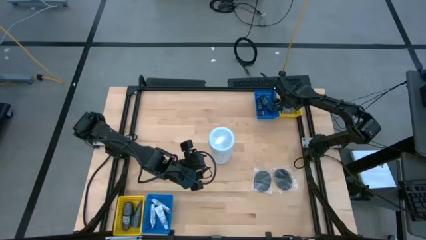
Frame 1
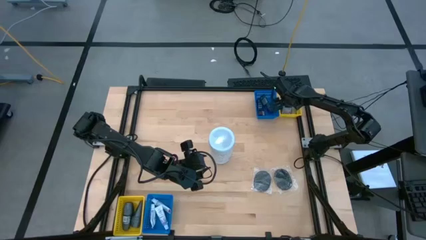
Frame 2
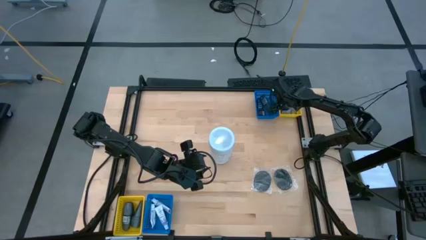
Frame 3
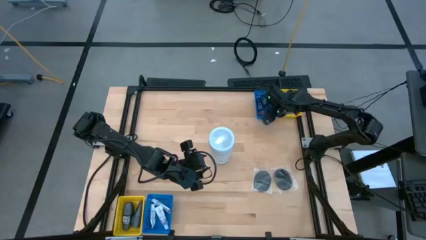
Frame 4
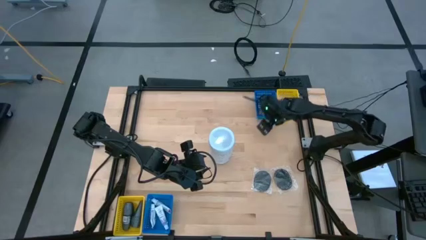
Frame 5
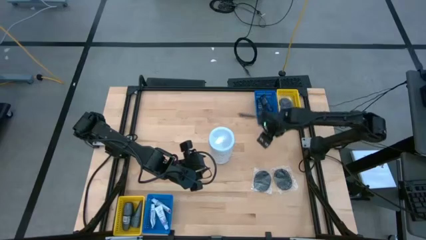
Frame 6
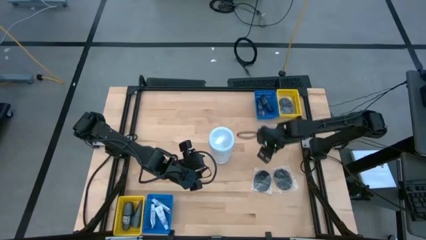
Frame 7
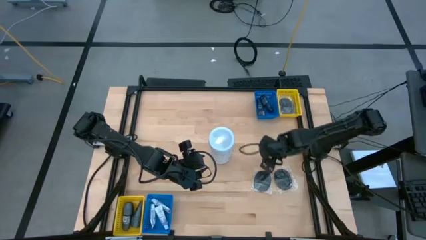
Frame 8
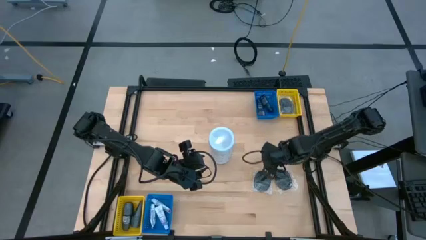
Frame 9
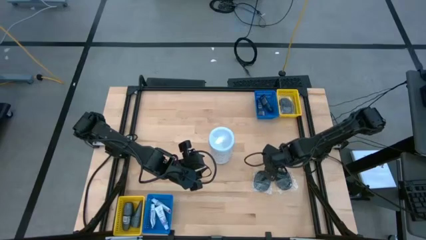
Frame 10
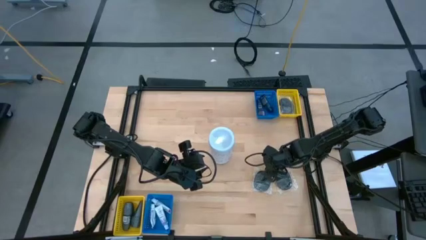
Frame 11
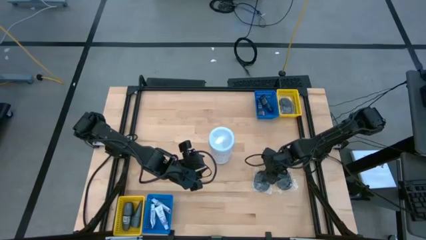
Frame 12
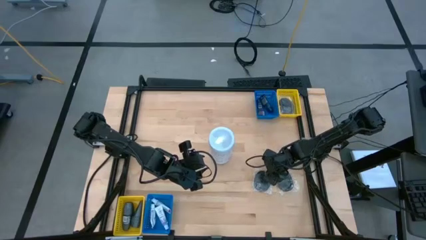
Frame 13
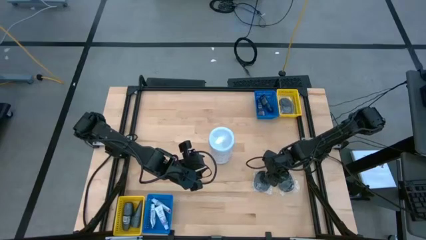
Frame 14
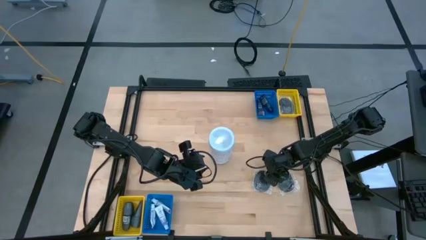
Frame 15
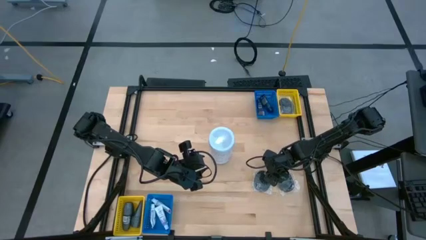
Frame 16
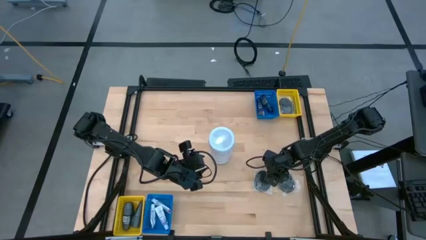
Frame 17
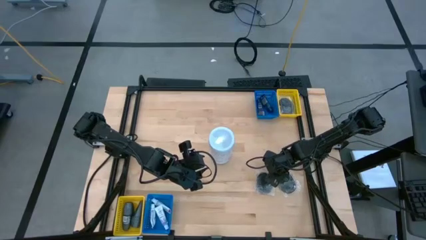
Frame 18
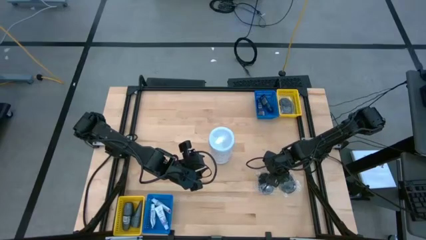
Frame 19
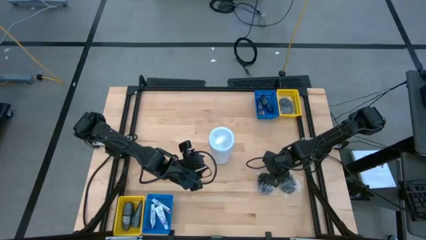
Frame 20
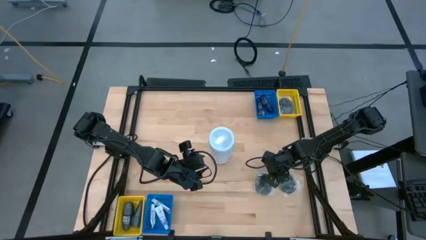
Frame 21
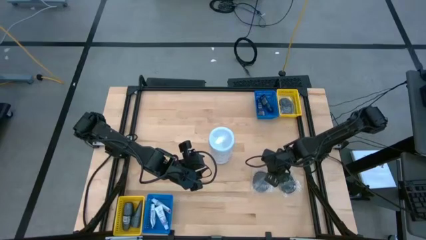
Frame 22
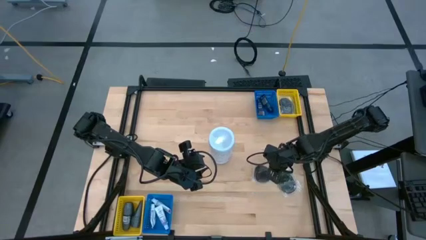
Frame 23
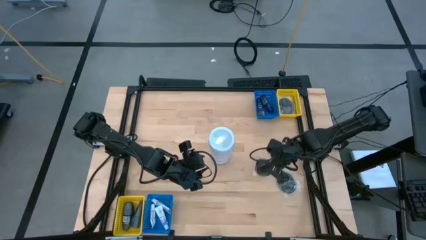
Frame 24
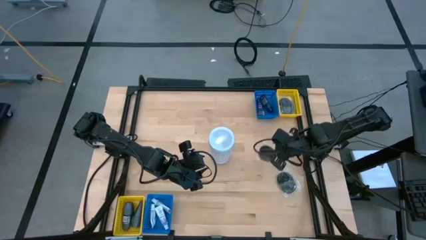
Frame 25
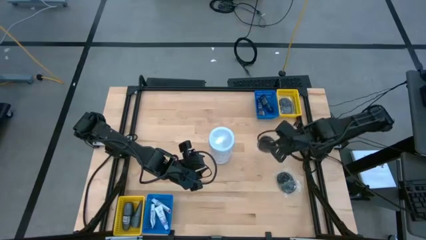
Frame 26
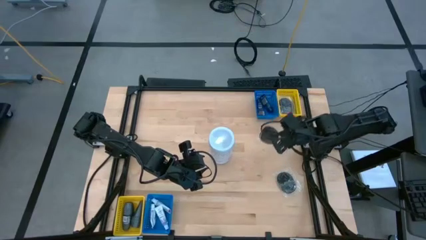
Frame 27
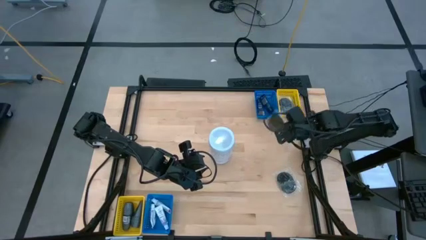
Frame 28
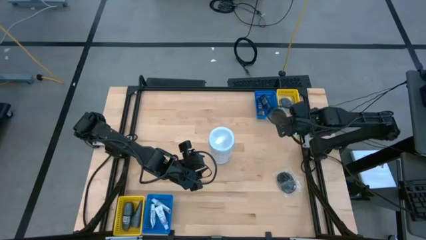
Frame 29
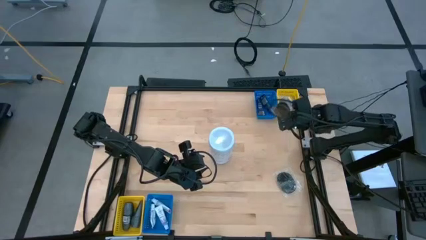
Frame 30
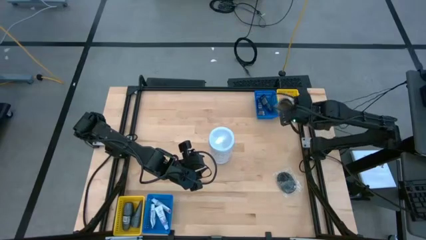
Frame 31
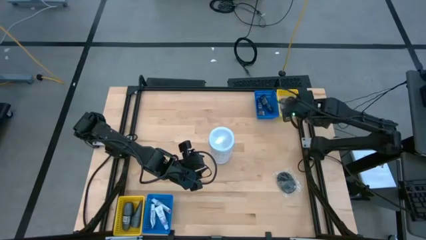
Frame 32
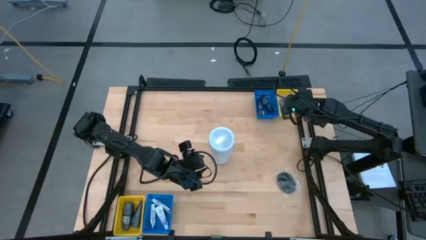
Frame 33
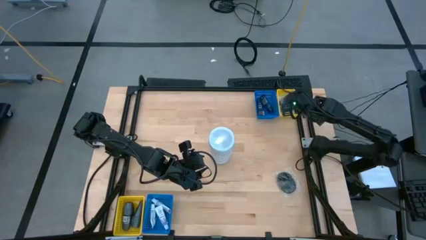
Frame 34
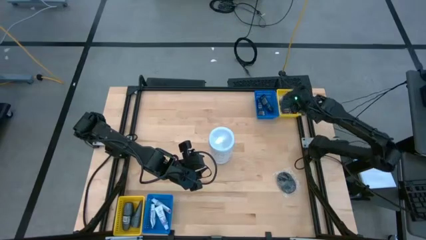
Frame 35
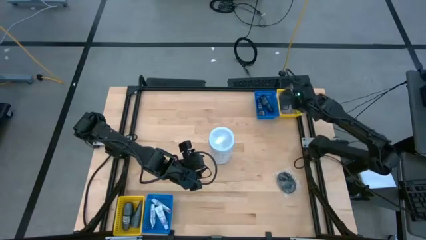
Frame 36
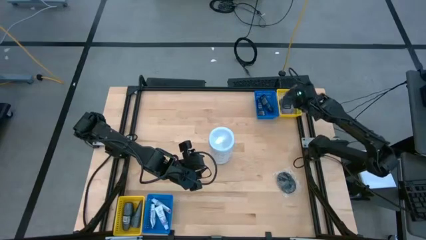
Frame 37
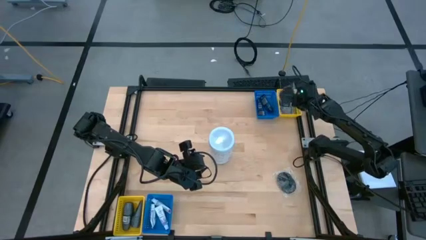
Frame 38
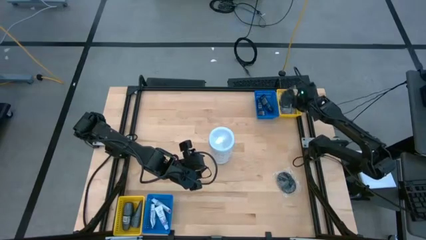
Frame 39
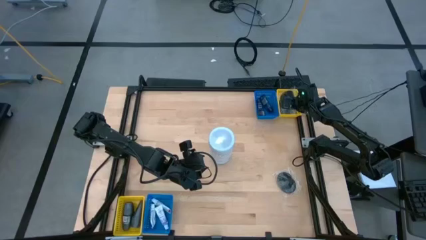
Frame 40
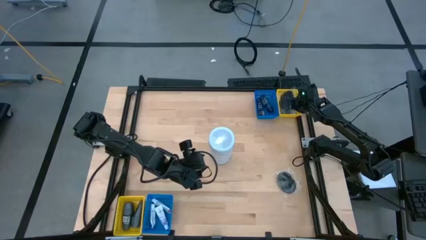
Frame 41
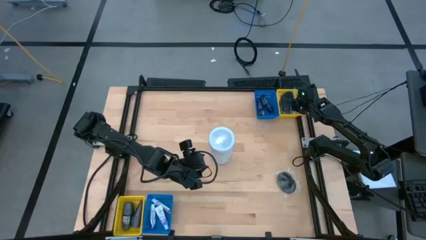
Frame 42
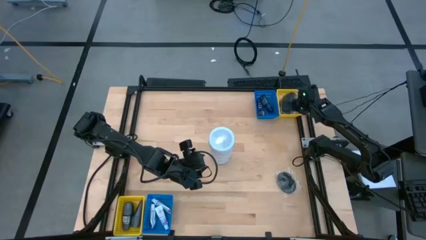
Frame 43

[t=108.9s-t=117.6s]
Task: Pick & Place Travel size toiletries
Put the black hairbrush into the top yellow bin

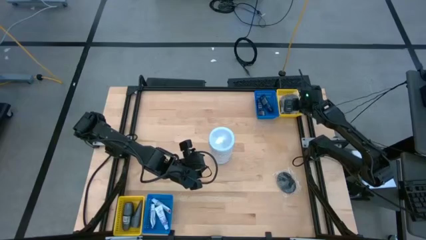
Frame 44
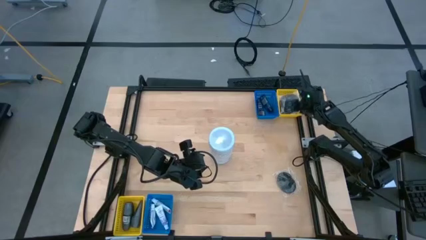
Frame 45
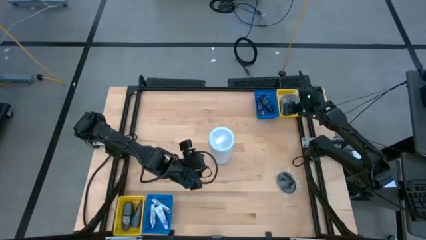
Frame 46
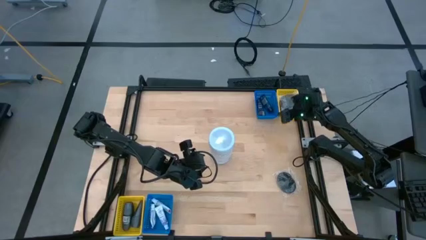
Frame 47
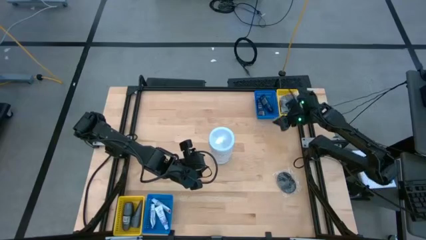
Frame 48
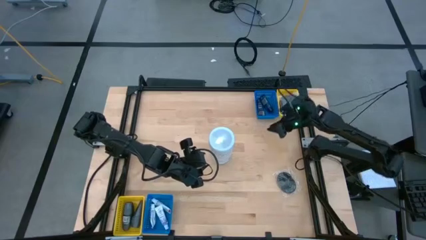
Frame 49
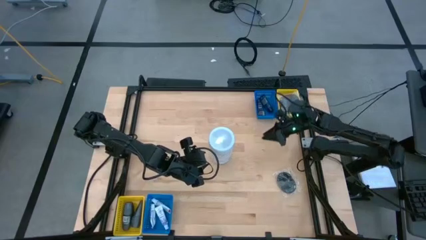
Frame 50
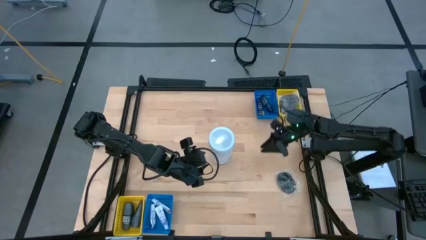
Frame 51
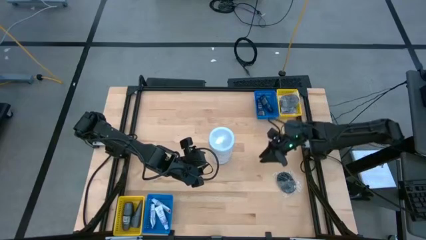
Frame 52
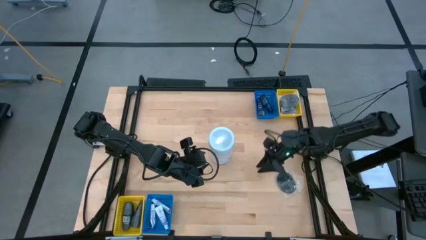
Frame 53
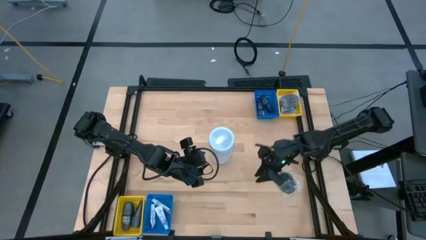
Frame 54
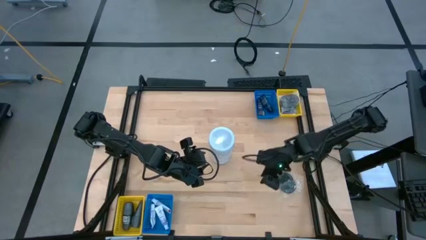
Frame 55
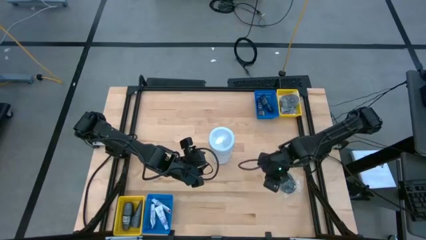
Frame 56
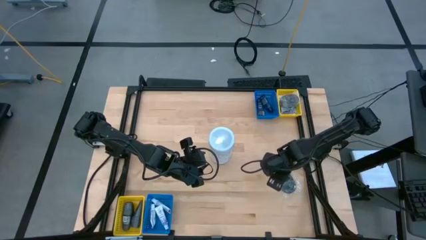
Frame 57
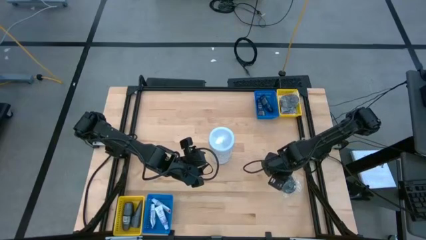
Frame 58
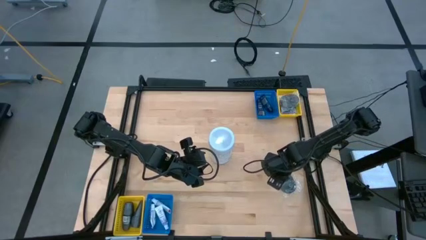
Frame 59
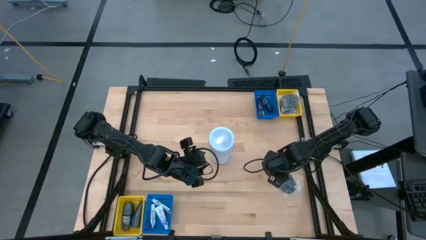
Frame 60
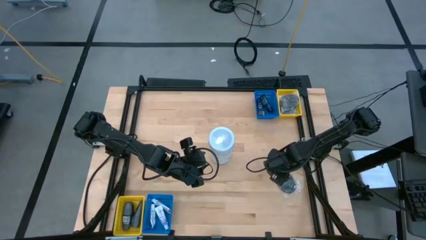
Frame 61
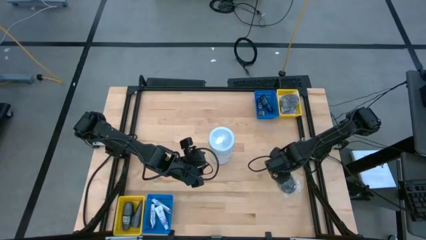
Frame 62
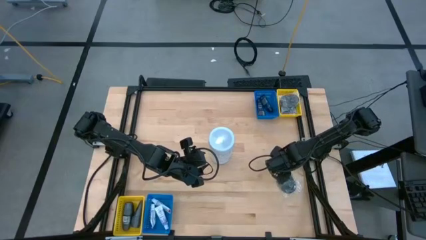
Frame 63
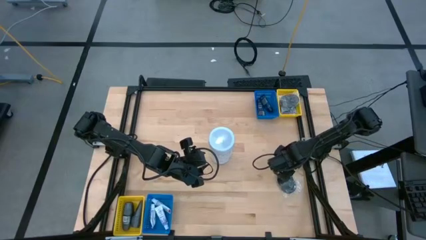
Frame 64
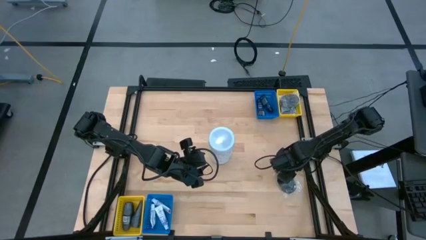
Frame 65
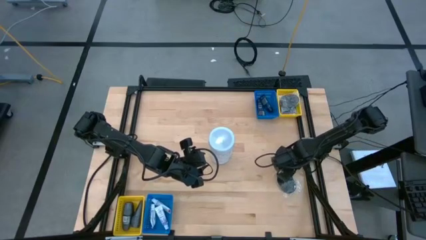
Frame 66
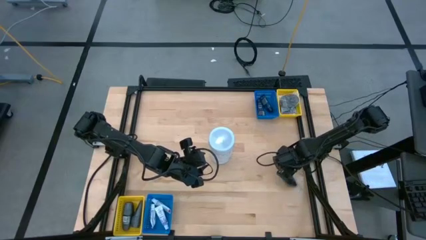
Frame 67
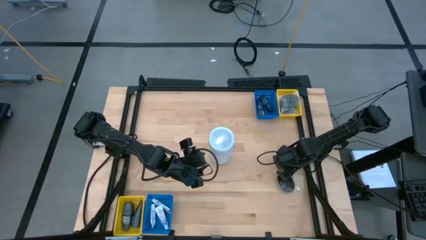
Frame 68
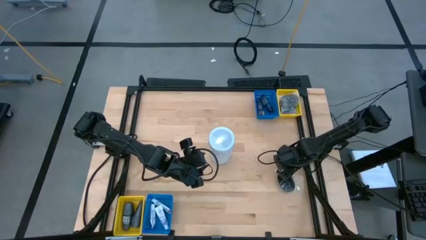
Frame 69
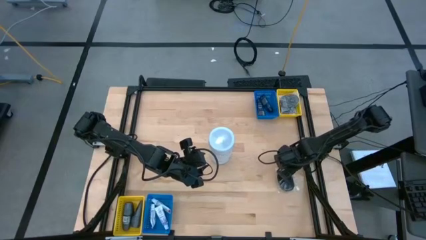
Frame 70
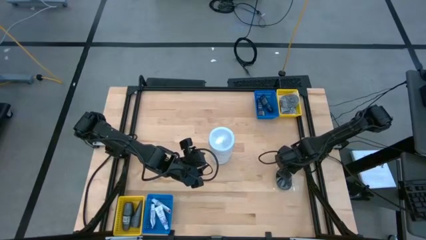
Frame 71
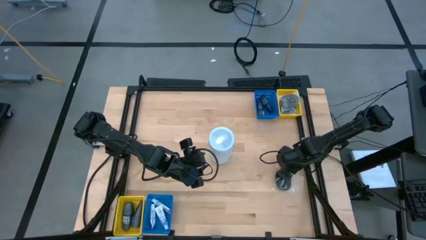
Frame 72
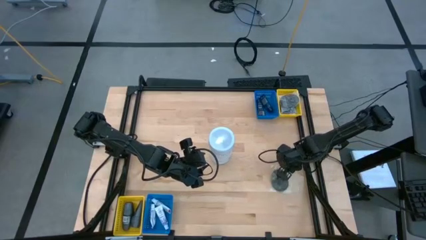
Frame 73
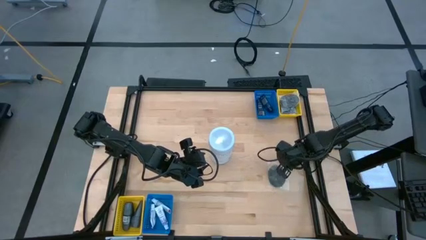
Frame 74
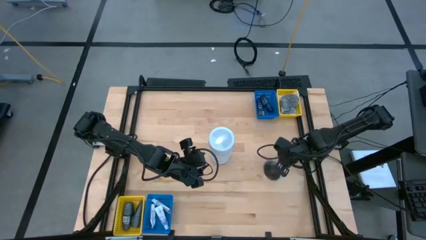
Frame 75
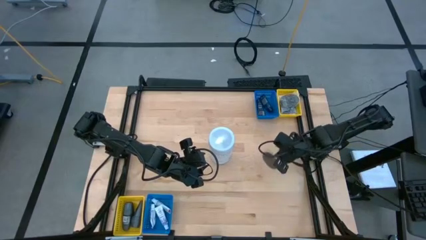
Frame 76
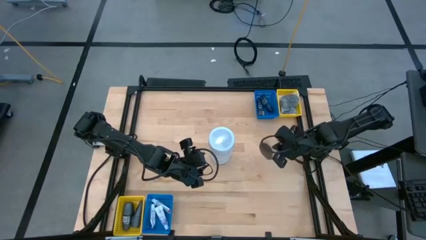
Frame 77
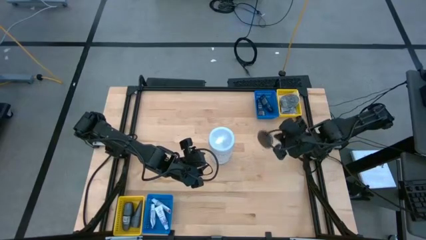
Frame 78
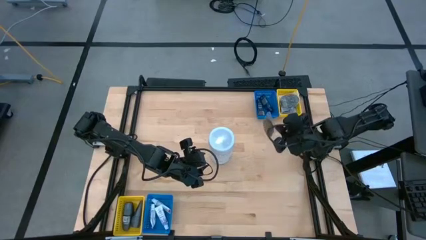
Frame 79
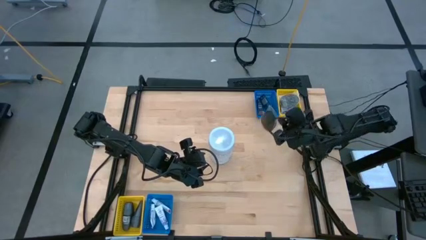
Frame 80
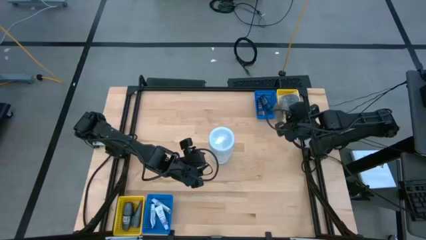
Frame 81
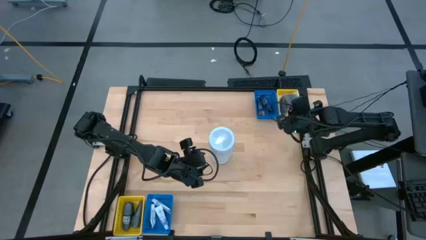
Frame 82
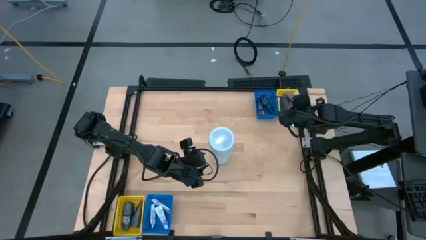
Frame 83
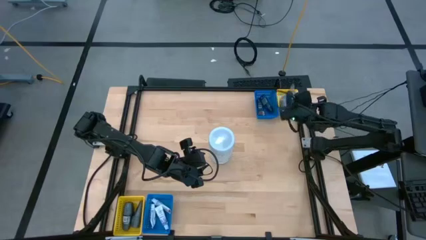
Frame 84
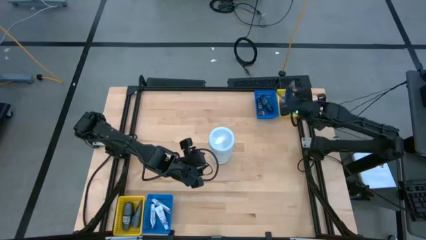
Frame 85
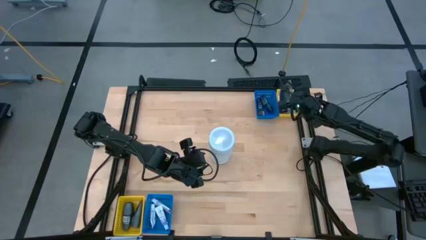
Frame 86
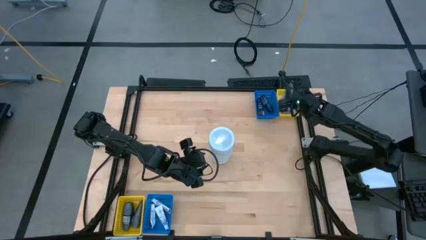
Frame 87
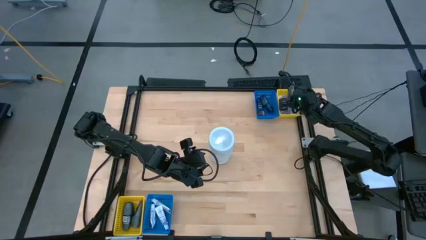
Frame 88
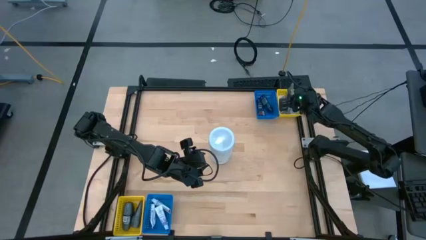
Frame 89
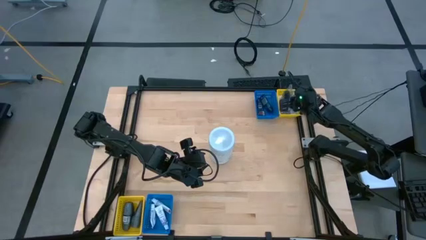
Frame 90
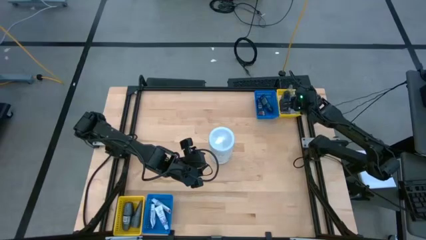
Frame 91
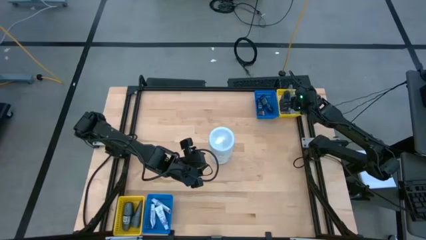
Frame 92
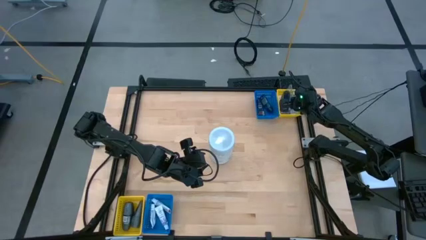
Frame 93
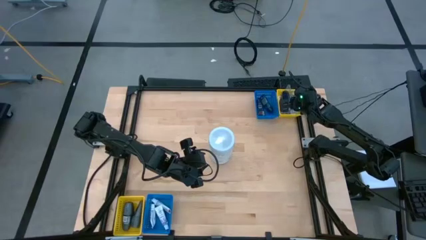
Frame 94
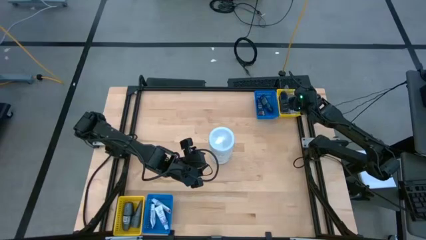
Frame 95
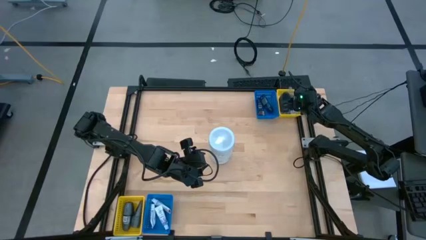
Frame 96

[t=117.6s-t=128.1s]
Put the hairbrush into the top yellow bin
